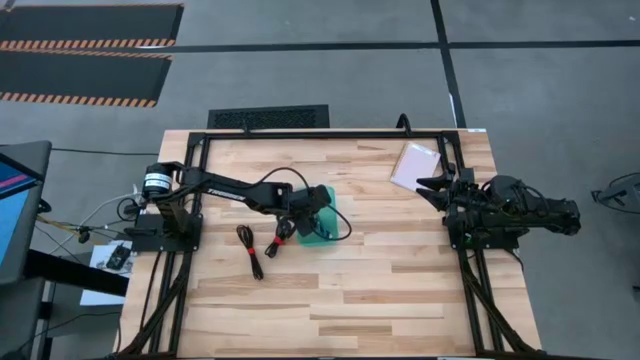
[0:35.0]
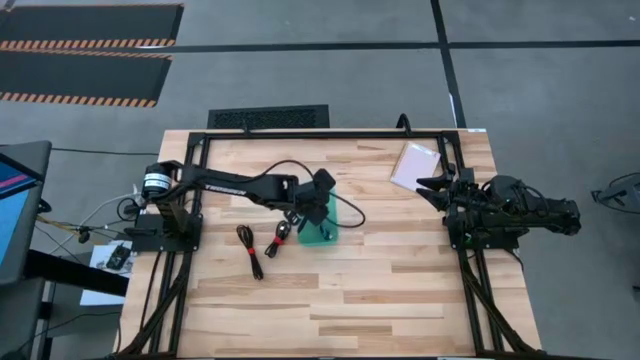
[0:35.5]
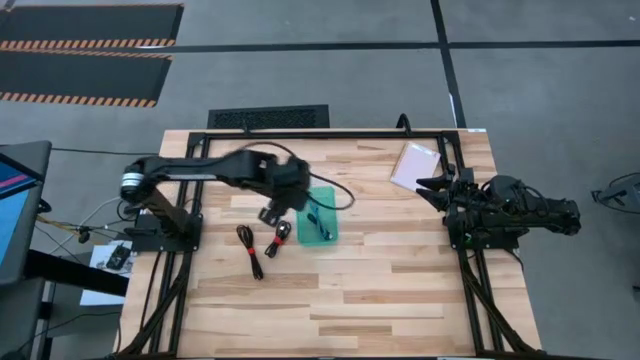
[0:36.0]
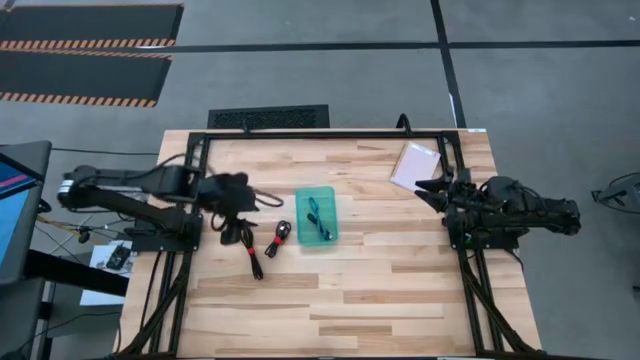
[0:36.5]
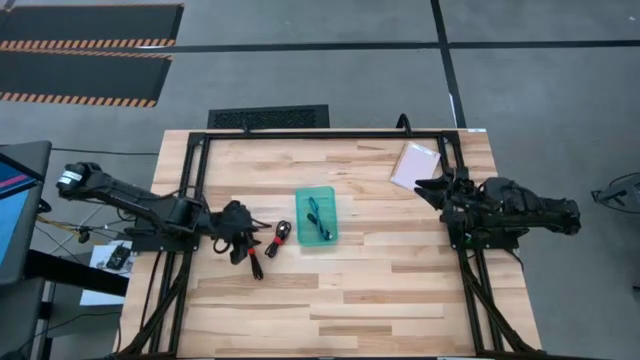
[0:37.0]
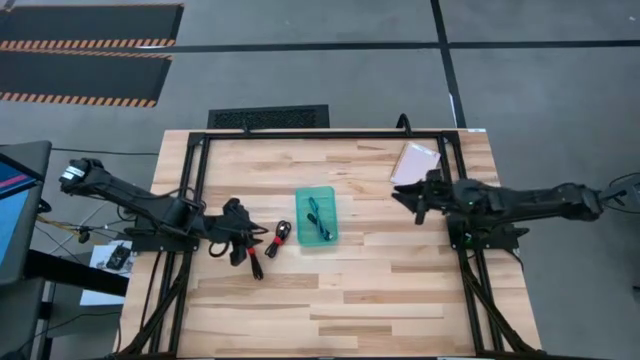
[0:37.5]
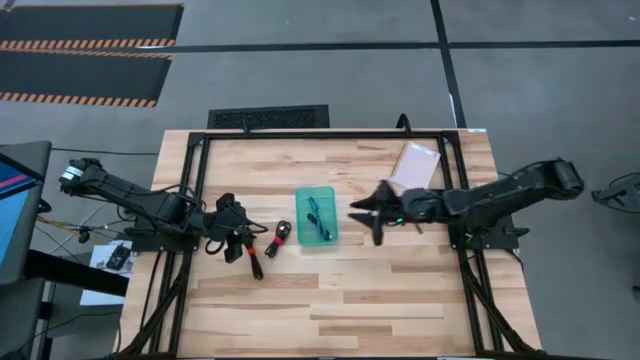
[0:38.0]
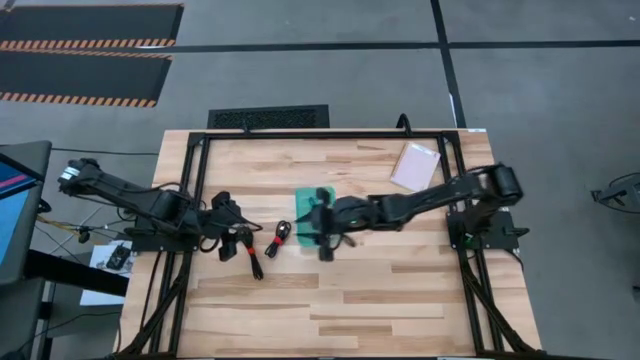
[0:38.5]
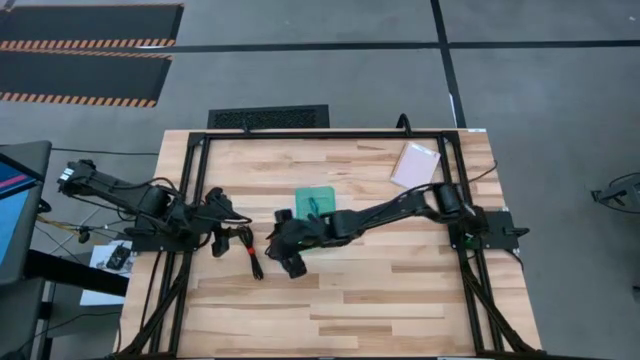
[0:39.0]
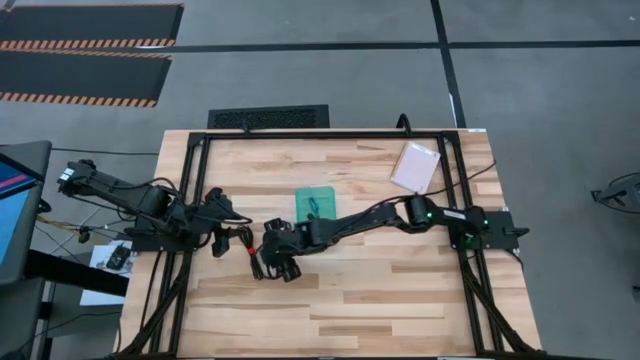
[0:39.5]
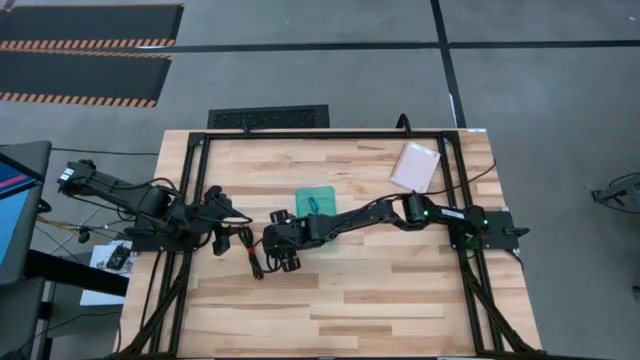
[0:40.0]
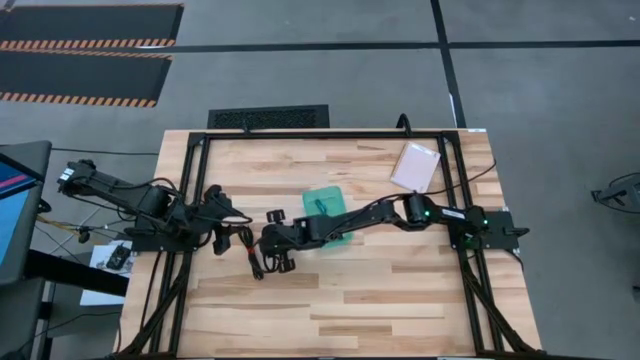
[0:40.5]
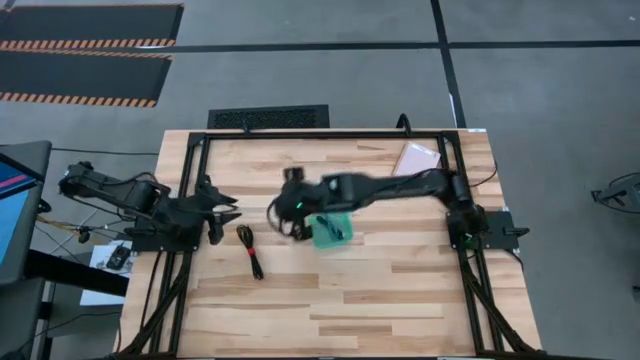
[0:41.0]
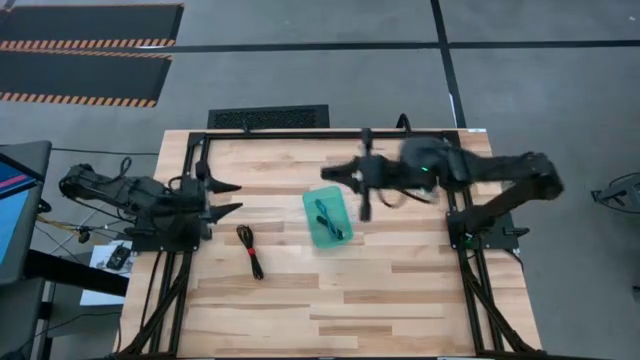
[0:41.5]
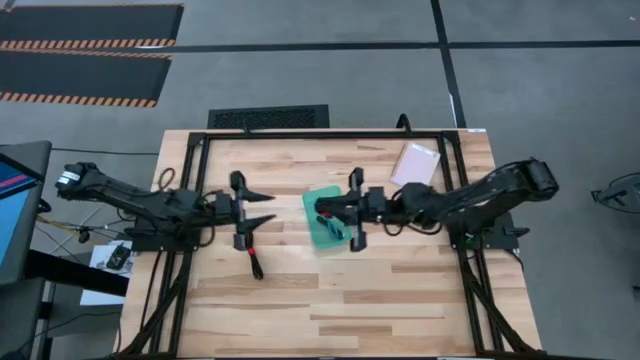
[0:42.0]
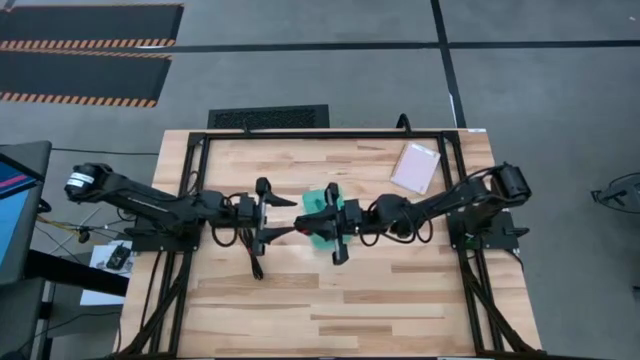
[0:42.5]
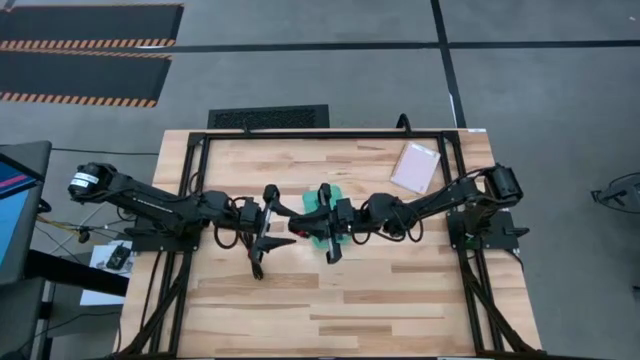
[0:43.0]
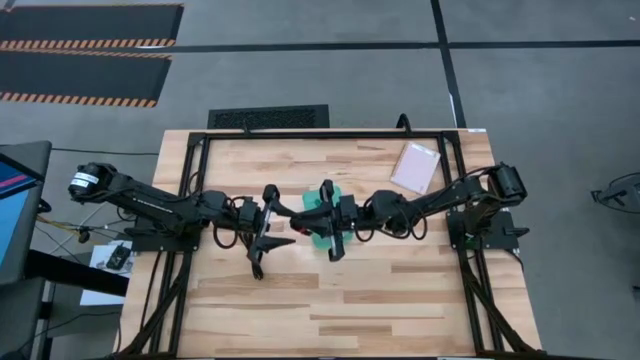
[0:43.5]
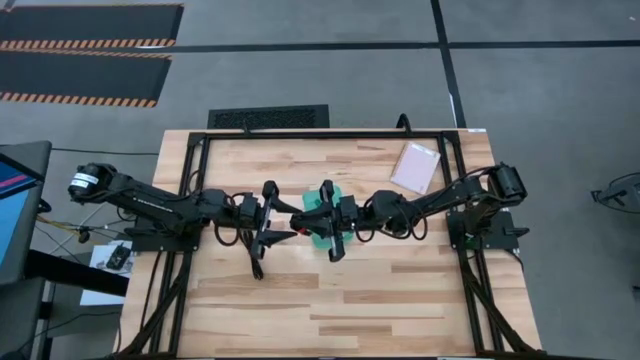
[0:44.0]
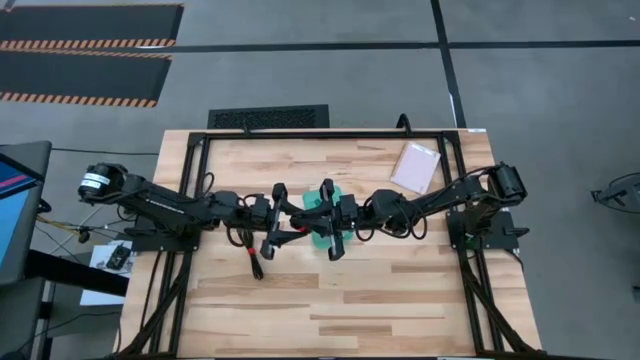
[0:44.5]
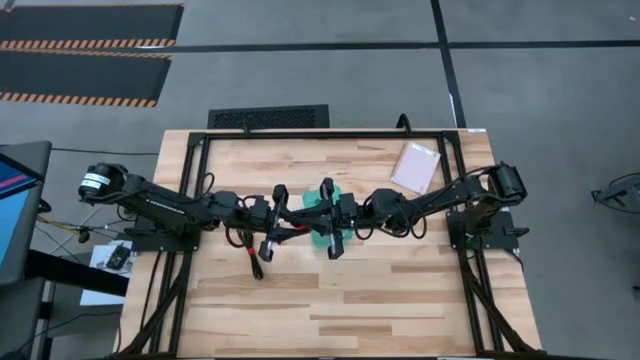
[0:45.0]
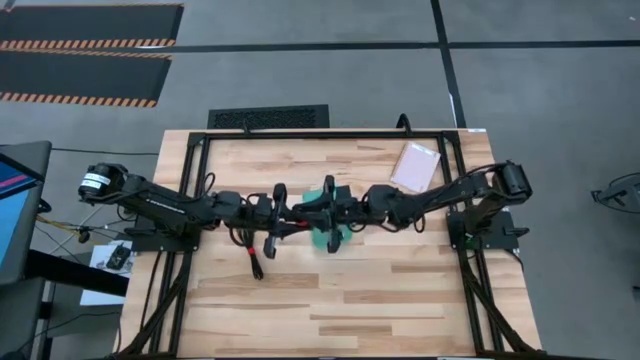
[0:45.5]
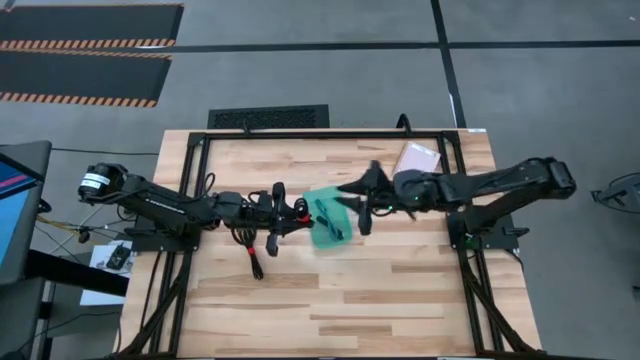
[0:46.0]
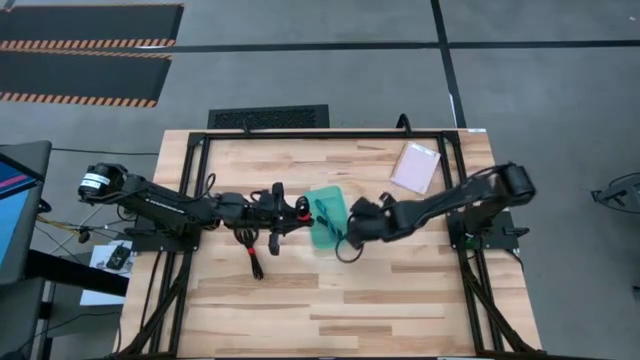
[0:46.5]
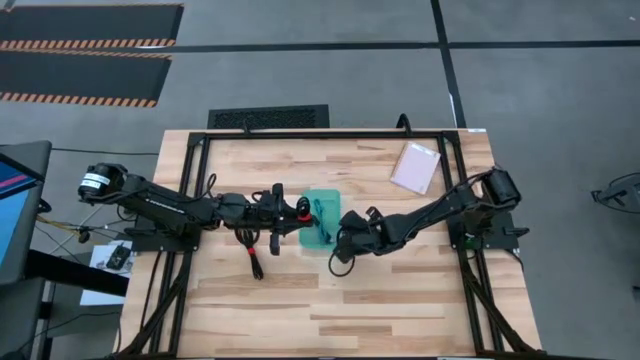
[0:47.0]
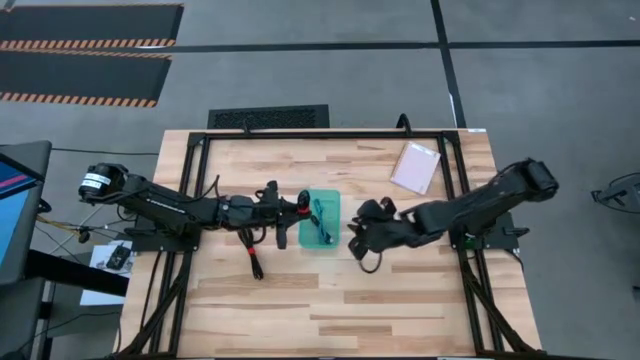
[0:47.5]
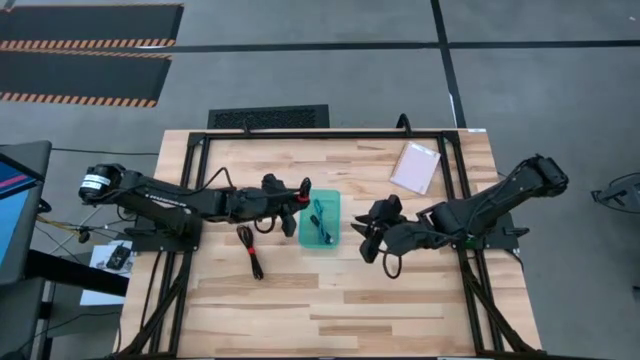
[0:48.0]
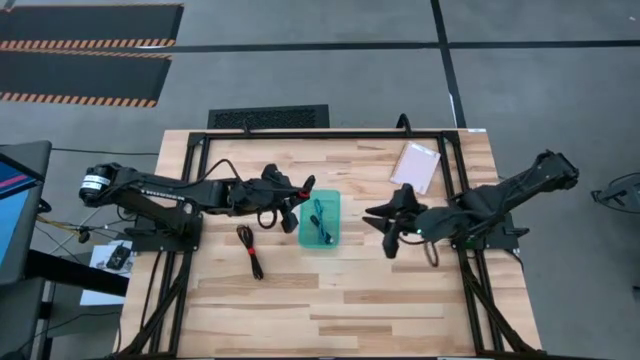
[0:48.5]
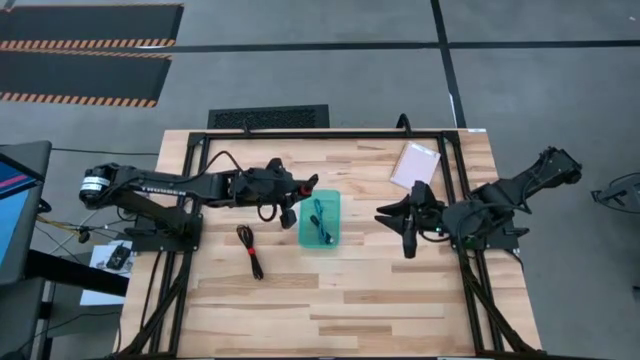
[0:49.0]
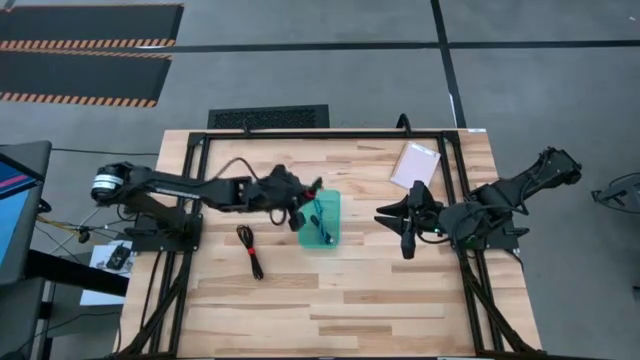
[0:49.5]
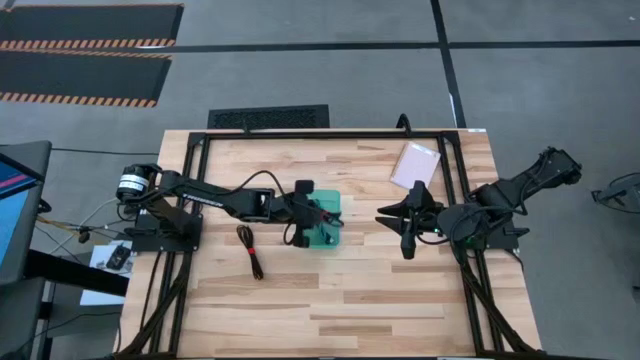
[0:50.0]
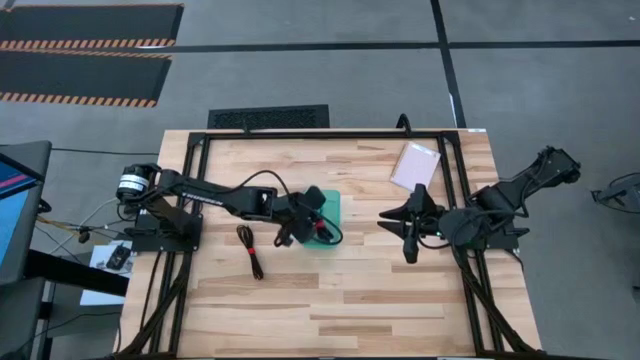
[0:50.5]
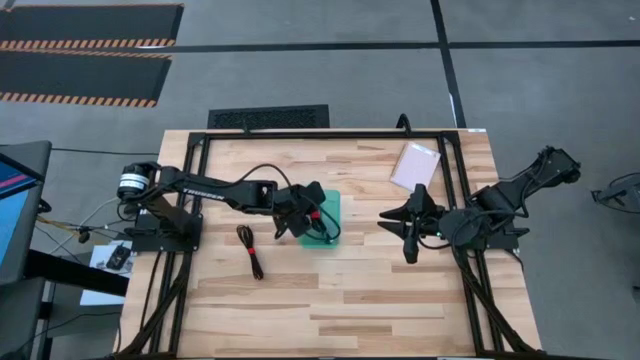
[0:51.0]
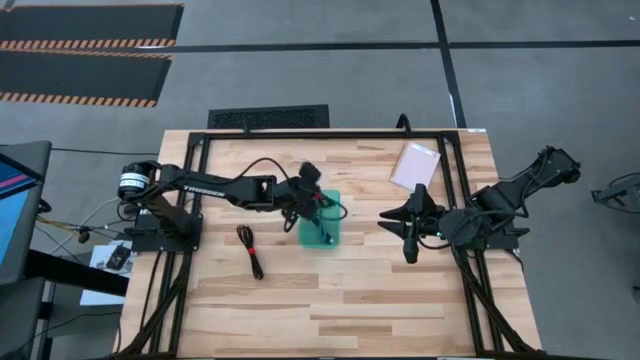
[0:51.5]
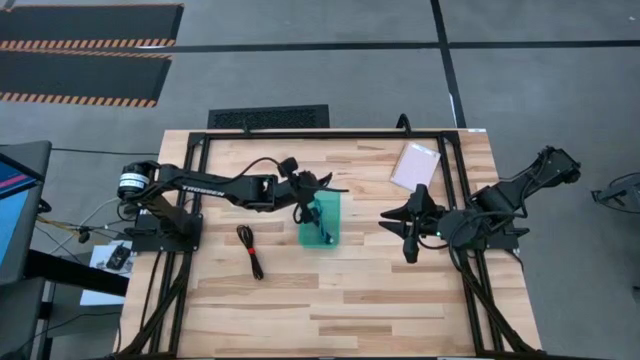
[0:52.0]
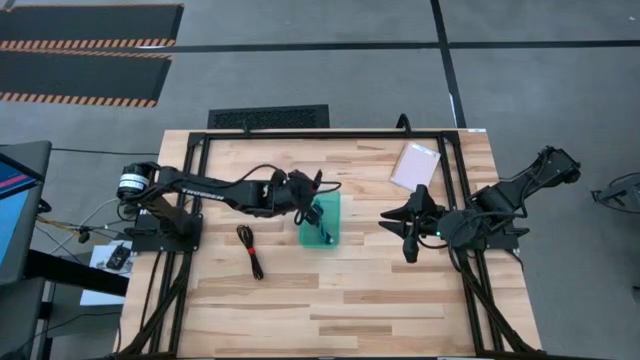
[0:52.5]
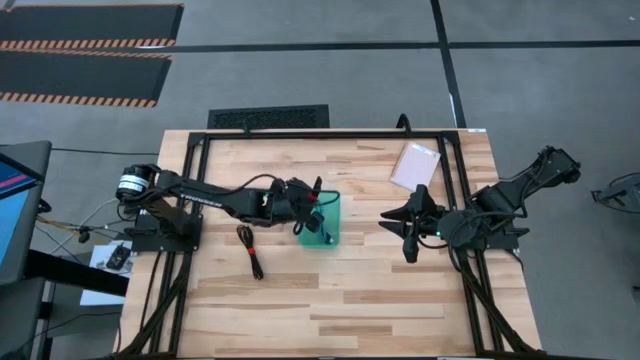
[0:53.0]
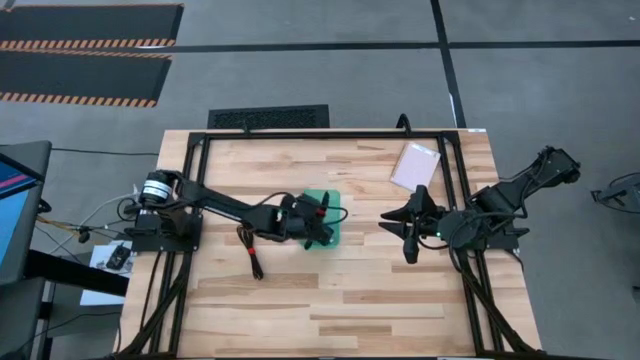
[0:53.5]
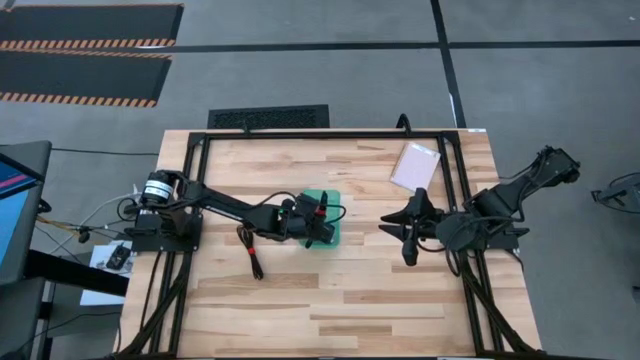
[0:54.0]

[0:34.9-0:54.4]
Task: Pick and place USB-C Cables
Put the right black charger cable into the green bin

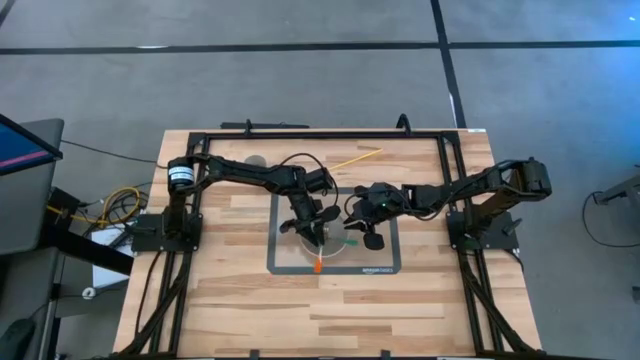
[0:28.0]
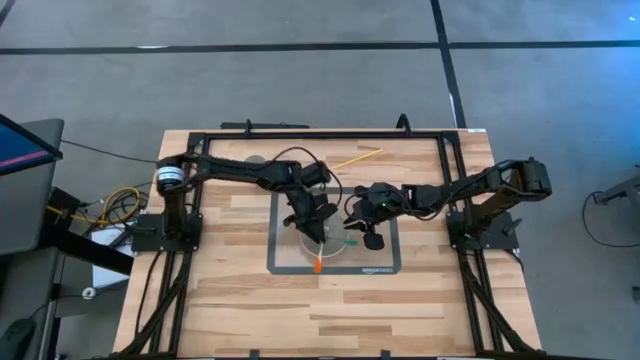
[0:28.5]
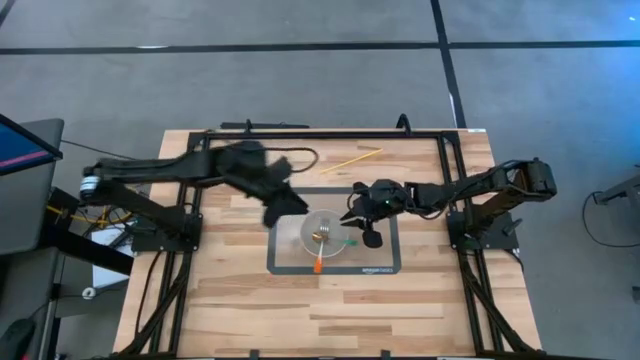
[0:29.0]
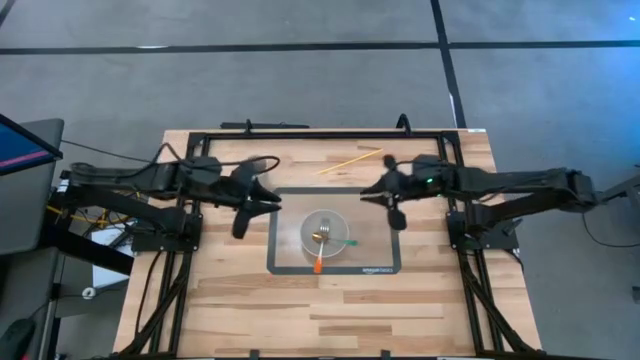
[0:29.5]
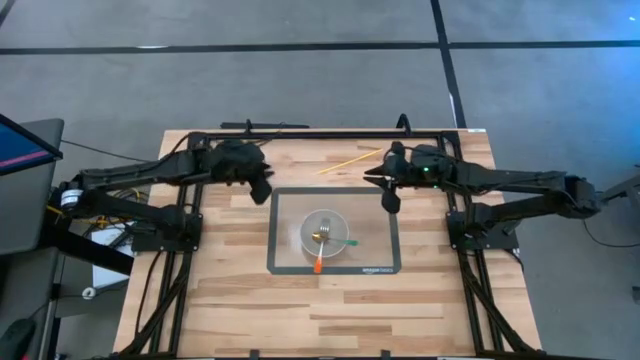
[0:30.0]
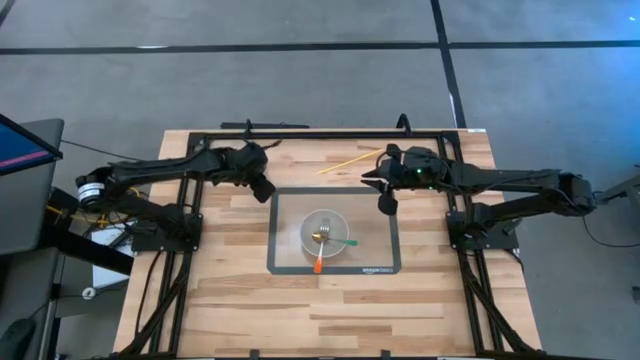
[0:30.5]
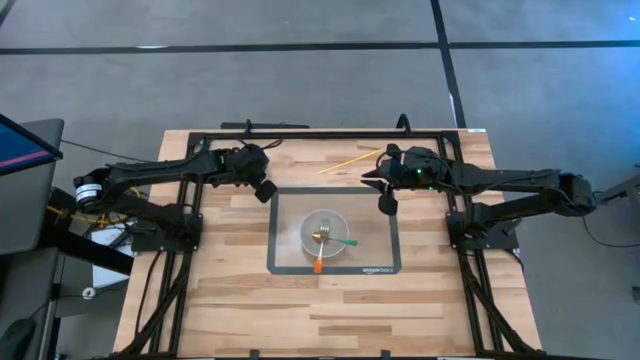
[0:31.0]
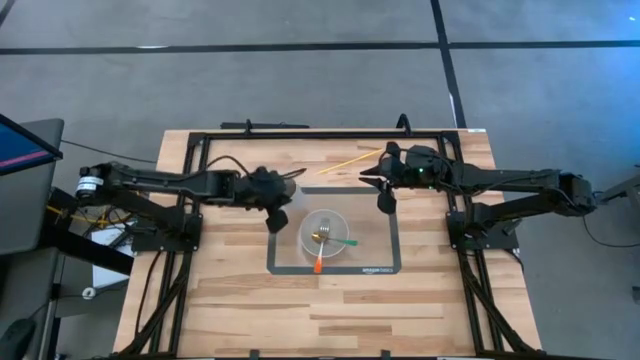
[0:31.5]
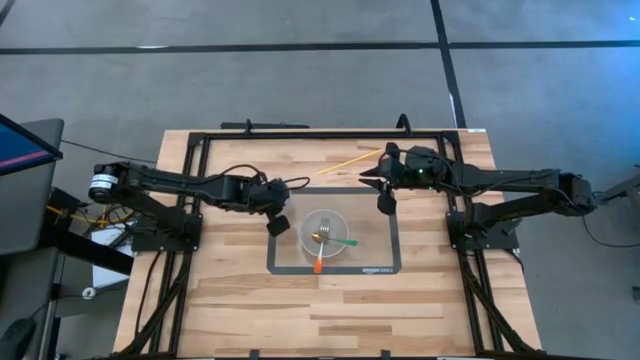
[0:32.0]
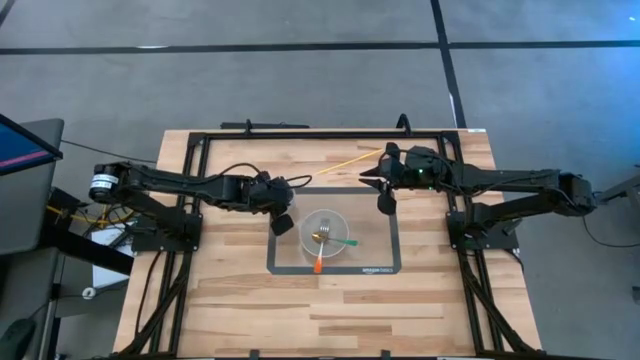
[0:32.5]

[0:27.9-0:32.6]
Task: Pick & Place Utensil
Put the white cup on the transparent placemat to the top left of the white bowl
